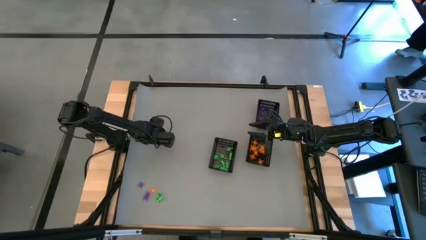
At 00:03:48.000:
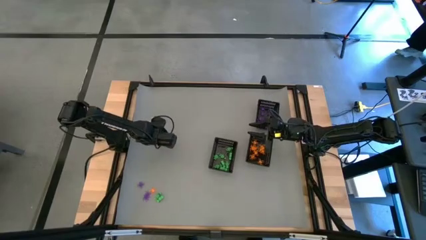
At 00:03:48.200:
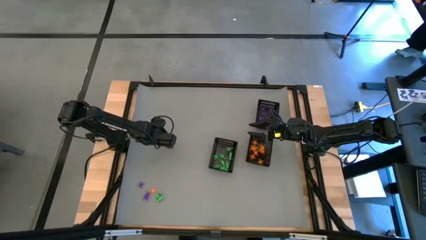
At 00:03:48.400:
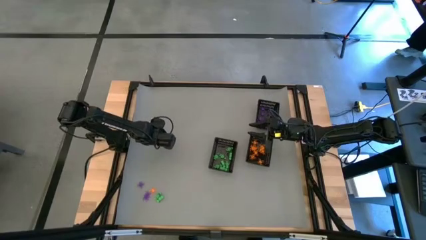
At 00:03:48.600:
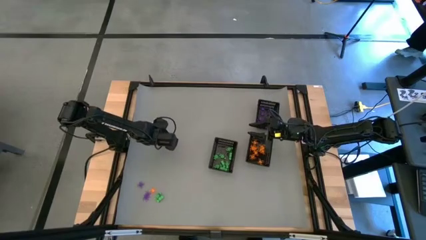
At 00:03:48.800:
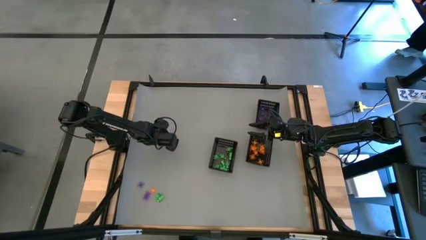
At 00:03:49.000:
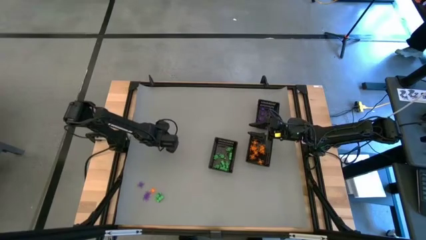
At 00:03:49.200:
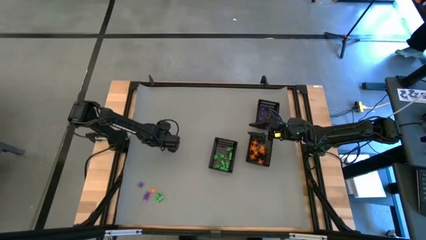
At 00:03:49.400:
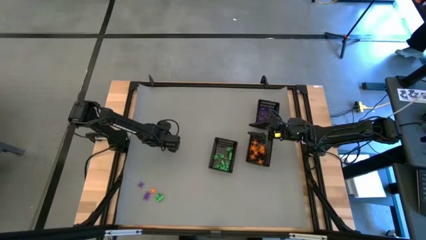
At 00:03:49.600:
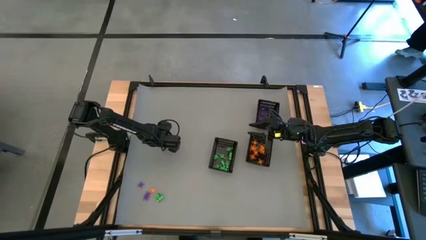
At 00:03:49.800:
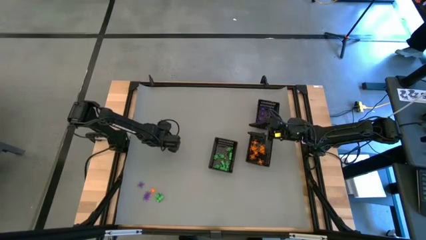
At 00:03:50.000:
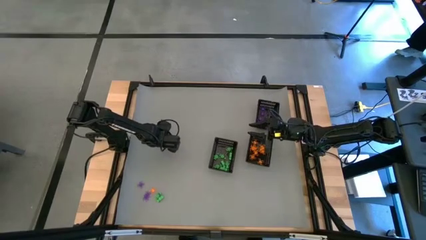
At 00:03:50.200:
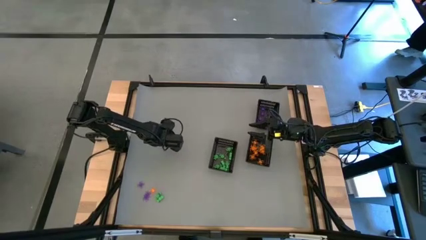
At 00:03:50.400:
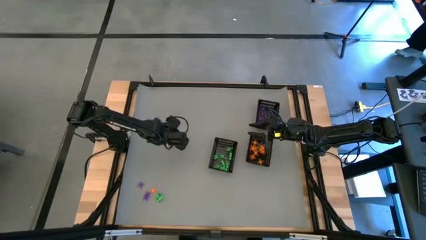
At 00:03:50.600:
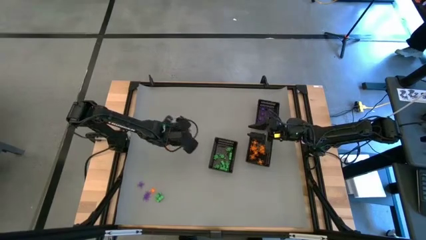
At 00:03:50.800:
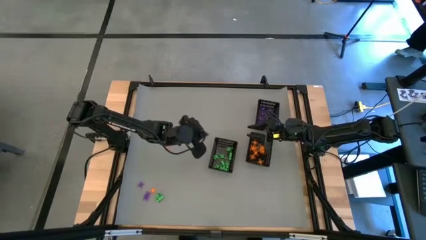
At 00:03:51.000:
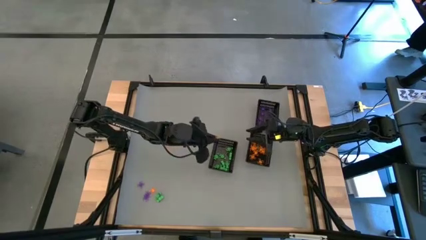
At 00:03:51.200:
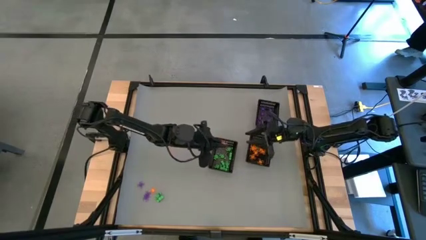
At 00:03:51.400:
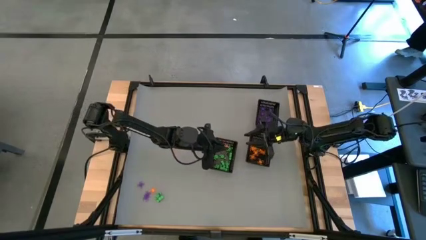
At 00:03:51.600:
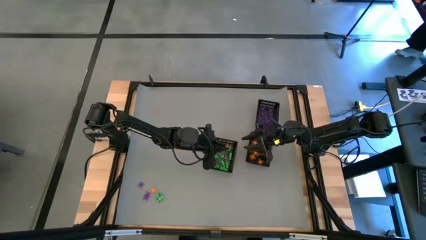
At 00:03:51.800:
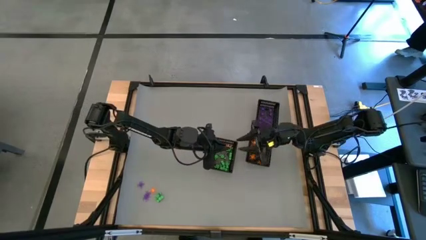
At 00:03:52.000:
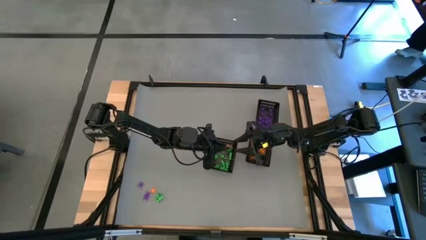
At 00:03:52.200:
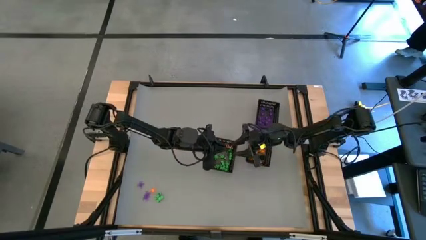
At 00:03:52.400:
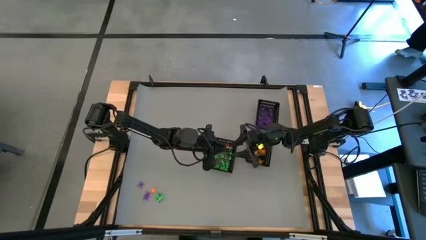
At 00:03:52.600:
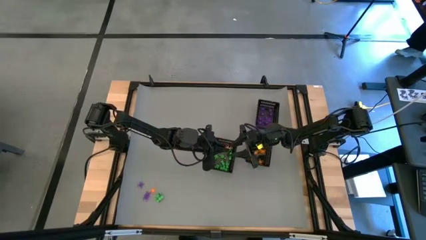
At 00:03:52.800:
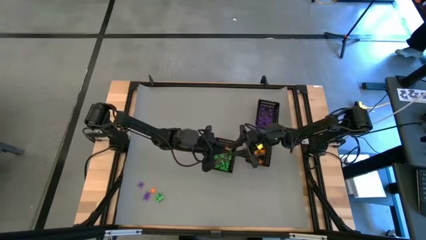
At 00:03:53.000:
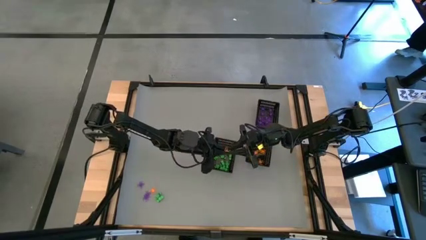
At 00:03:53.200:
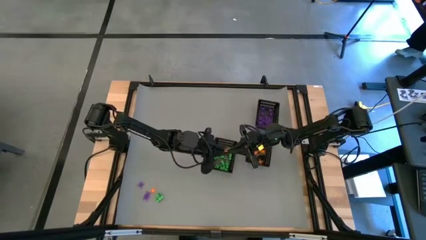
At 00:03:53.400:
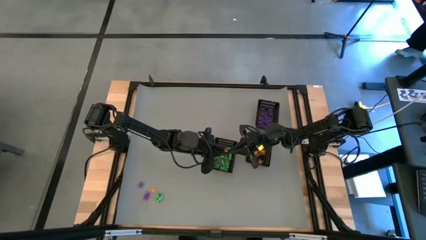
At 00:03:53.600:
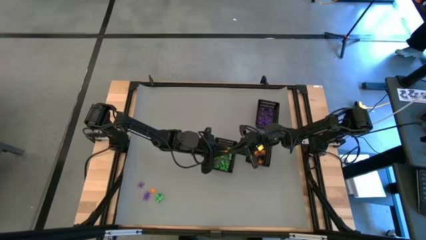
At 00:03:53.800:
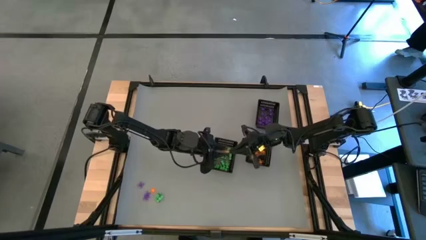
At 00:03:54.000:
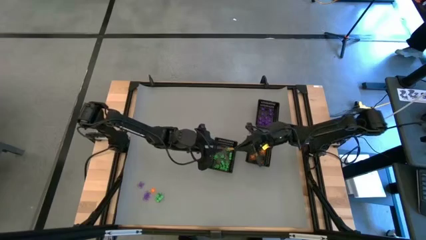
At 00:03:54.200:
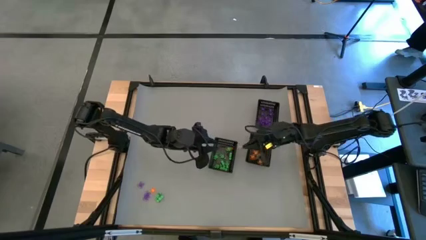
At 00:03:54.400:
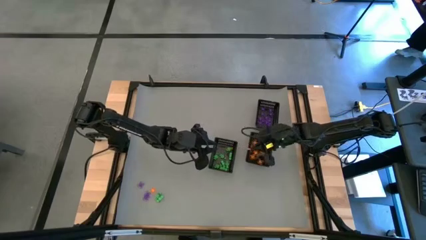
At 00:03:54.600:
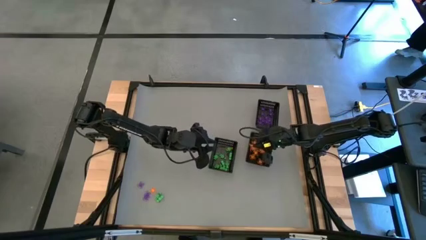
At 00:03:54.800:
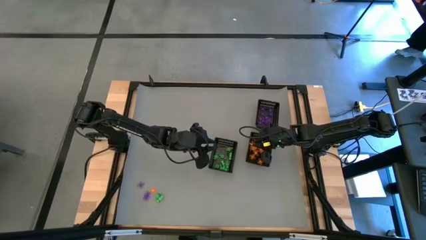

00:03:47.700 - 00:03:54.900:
Task: Sort Halloween decoration
Put the top orange spider toy into the bottom right bin

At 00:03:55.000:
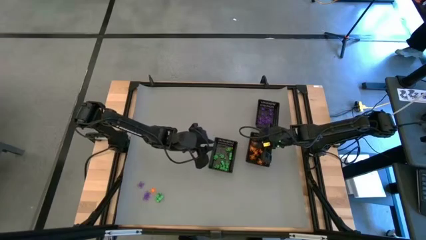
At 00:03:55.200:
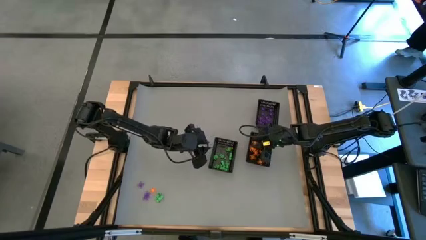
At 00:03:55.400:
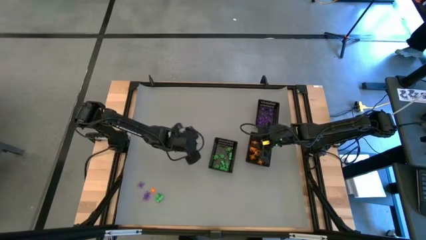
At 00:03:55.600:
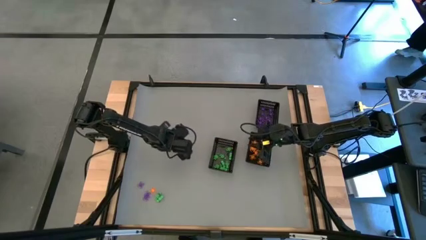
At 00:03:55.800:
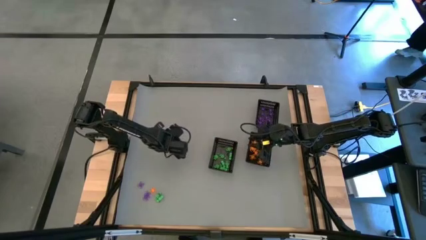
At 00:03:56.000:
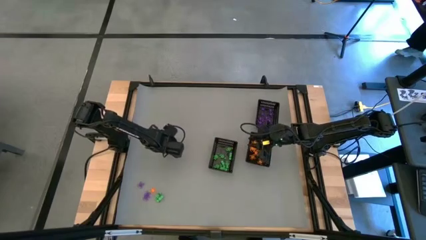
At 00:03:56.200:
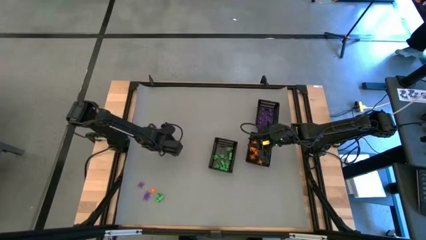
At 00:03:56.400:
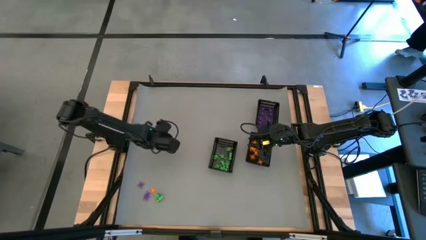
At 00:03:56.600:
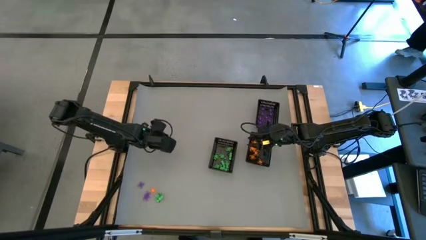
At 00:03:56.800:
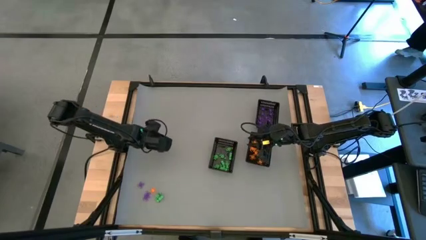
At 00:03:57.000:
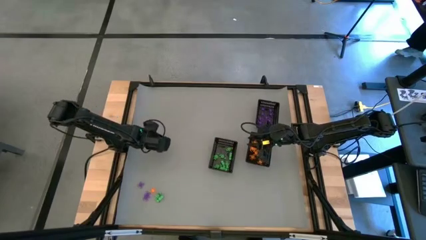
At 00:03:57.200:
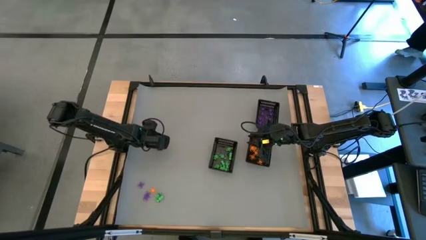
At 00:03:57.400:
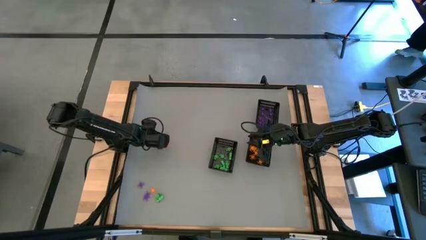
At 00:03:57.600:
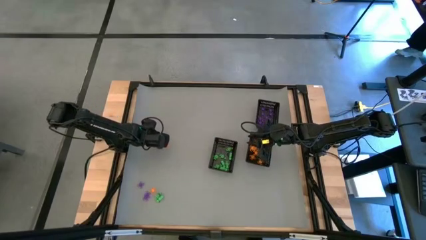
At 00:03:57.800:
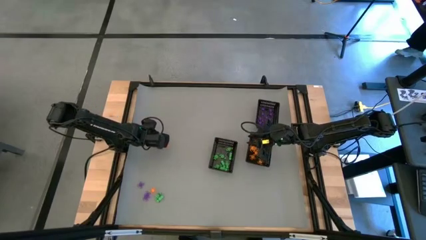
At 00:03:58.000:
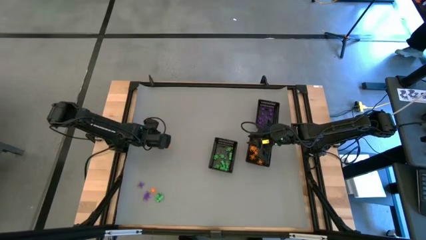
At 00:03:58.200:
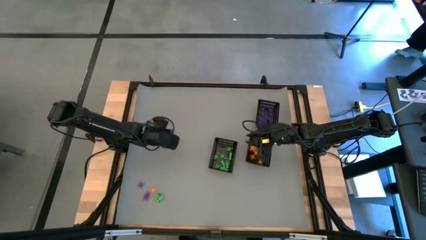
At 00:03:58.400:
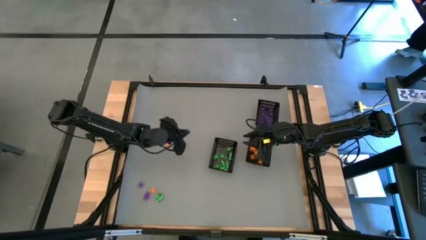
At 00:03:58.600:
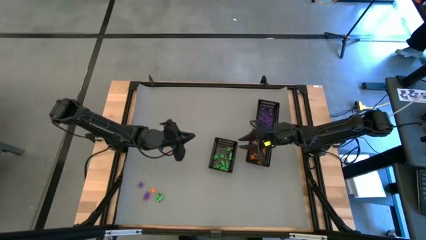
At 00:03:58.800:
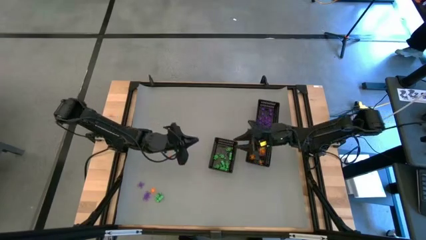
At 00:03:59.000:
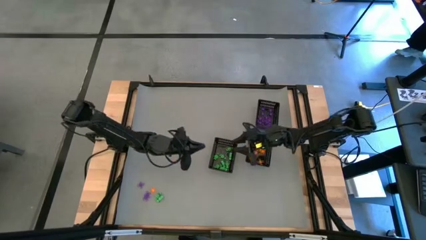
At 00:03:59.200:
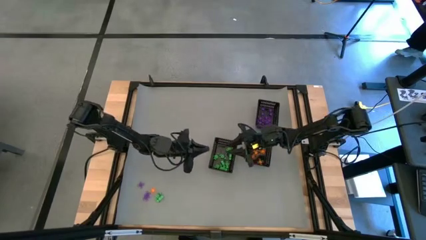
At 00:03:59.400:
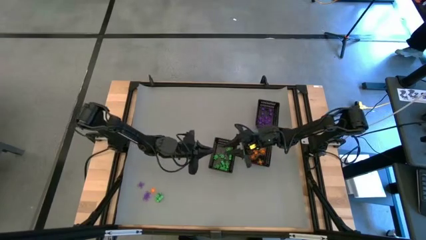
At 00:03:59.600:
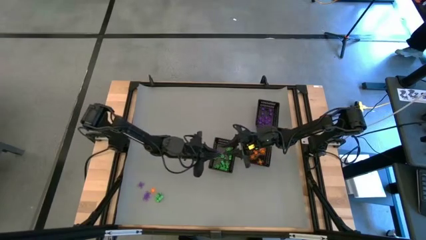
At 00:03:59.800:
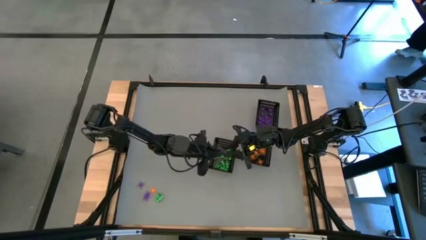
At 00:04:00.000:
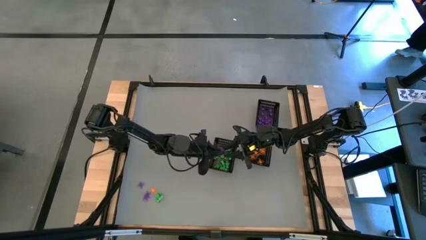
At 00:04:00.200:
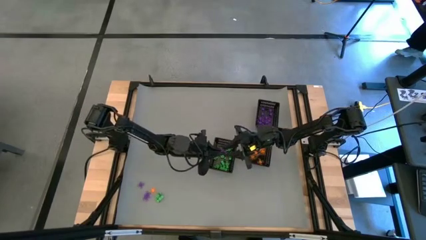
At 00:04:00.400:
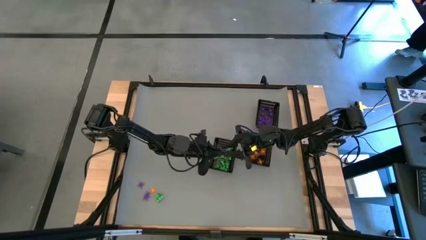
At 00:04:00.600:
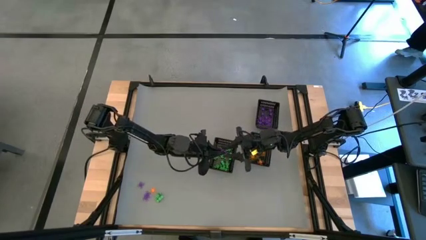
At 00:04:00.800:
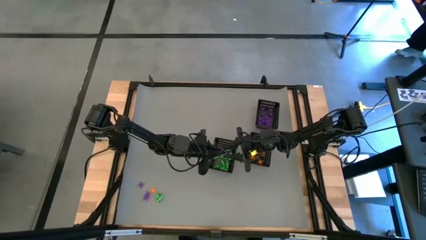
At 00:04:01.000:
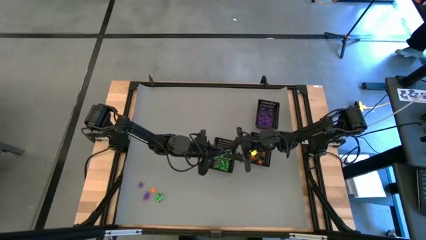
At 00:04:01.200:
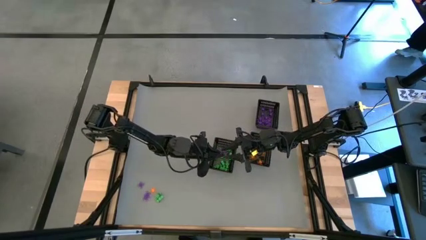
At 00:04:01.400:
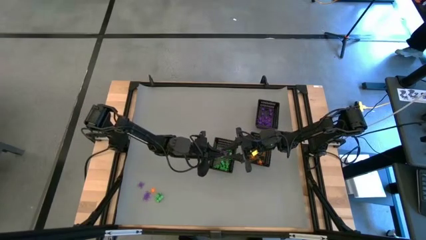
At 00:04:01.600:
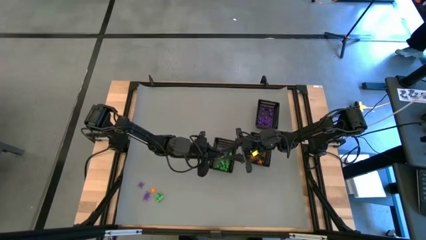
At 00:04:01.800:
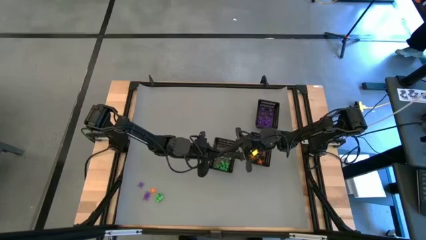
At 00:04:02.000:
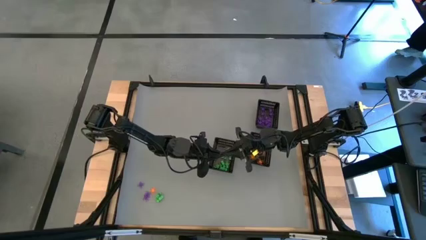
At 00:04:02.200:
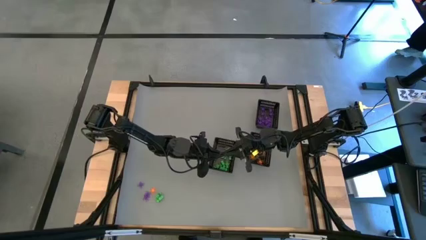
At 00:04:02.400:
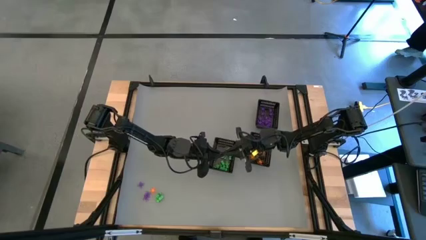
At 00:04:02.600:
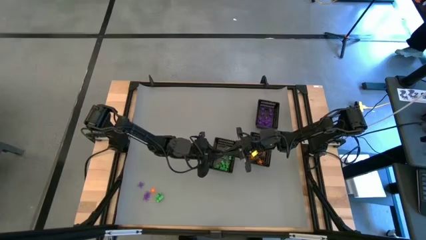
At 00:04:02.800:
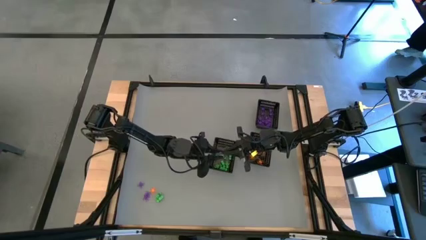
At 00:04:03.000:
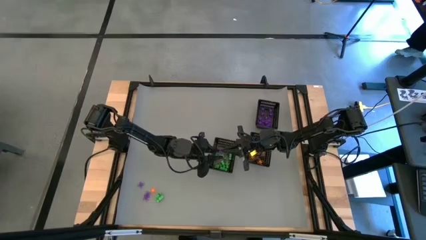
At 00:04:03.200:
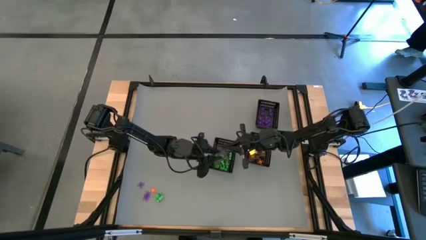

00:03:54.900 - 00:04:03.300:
Put the purple spider toy into the top bin
